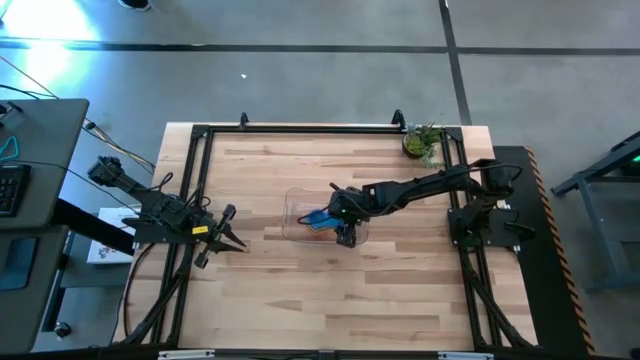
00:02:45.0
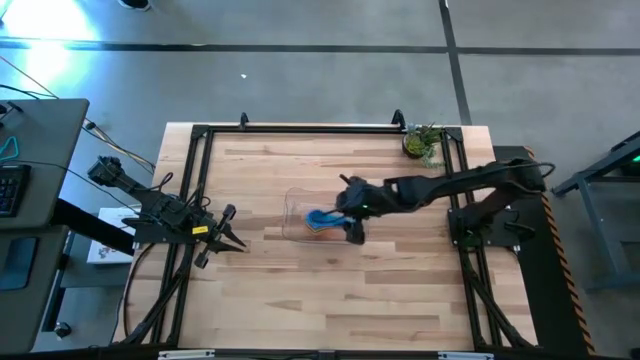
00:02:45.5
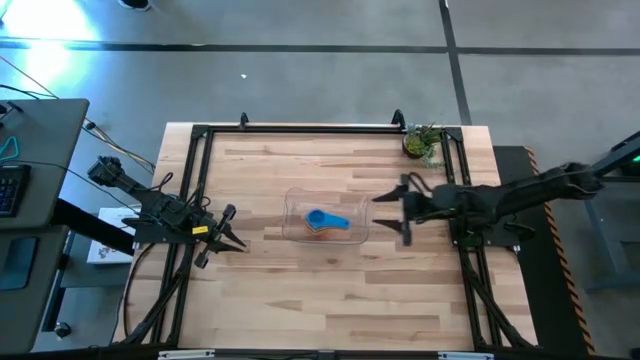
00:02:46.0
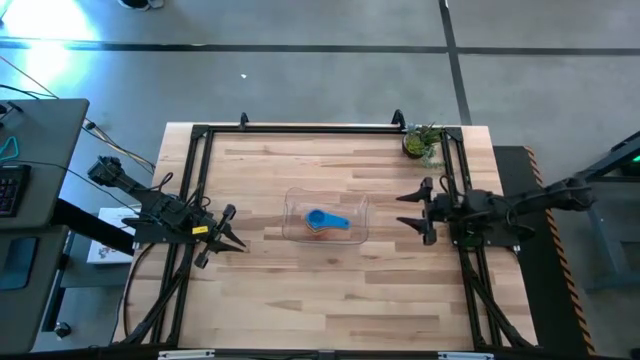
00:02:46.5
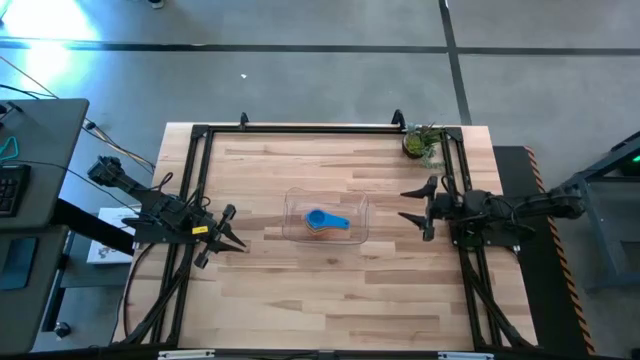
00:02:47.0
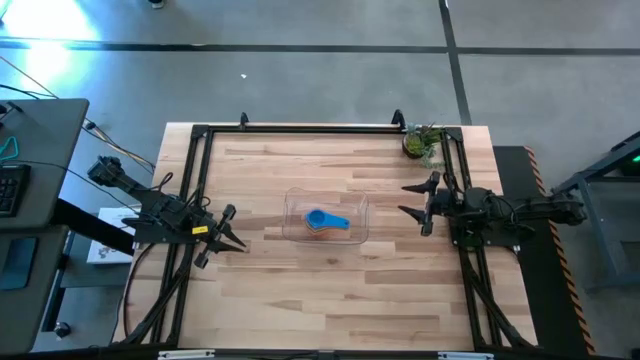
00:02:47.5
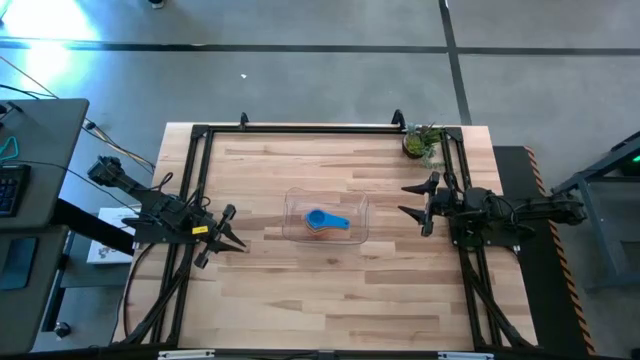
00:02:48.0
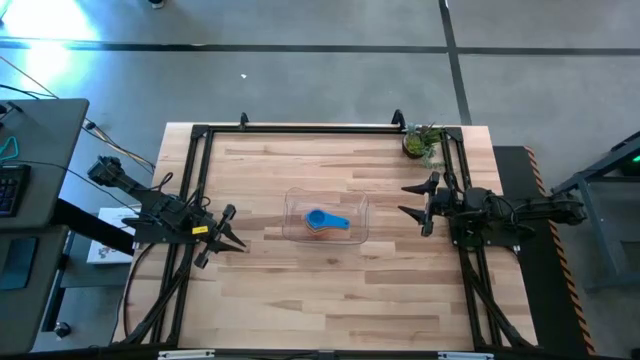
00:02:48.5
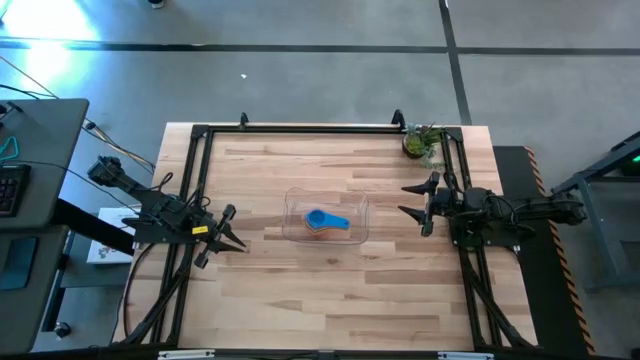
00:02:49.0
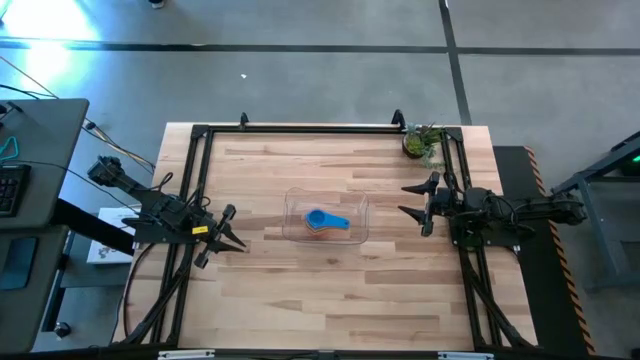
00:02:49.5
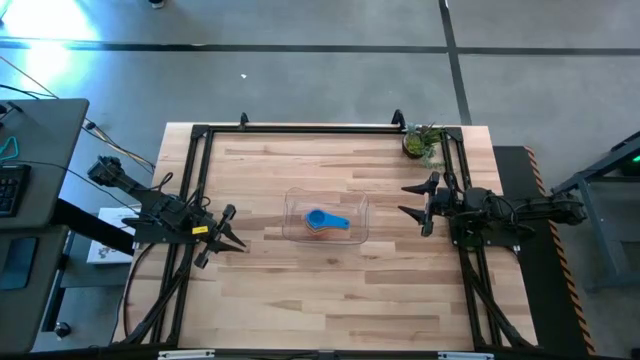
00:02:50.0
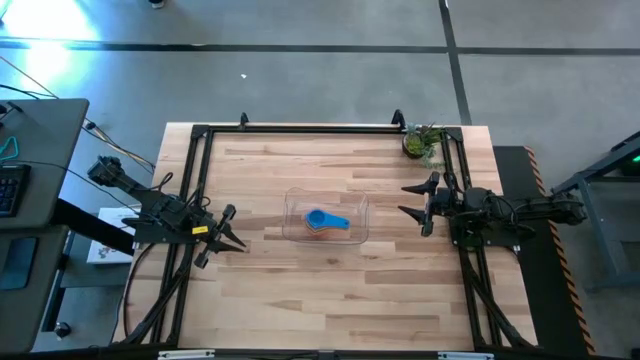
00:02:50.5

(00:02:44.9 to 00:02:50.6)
Task: Nest measuring cups in basket
Return to Home Position

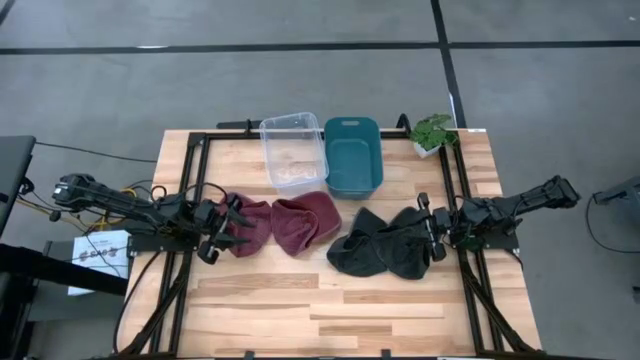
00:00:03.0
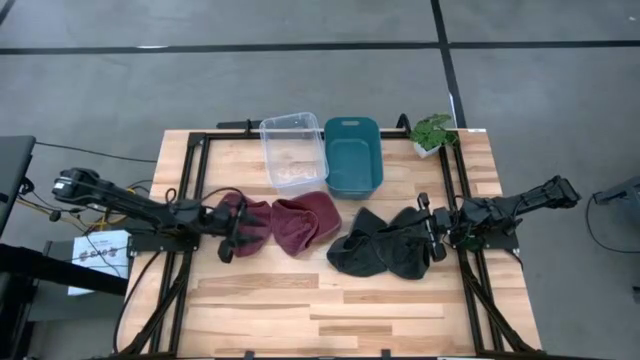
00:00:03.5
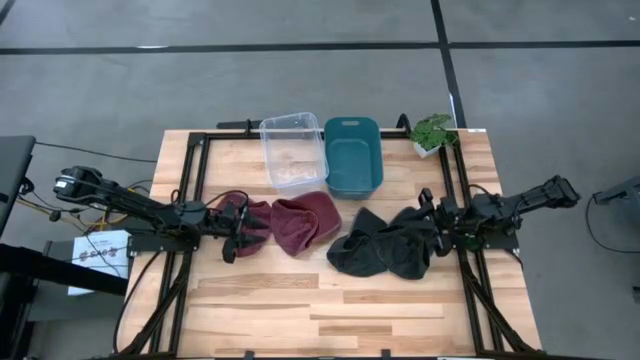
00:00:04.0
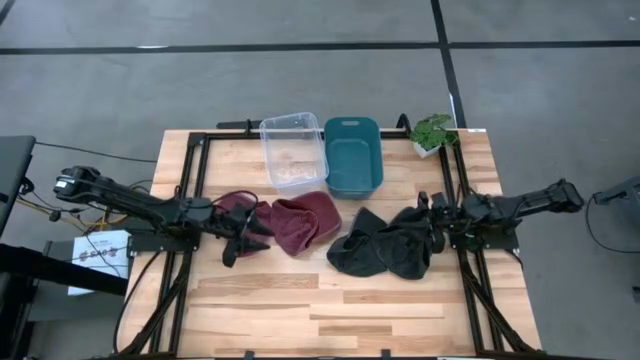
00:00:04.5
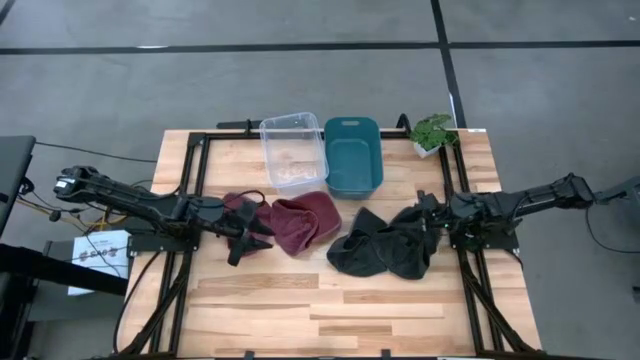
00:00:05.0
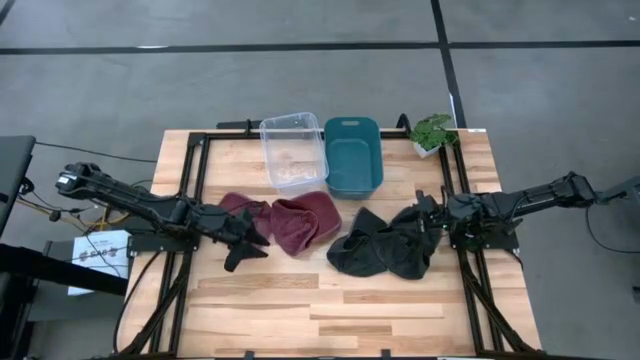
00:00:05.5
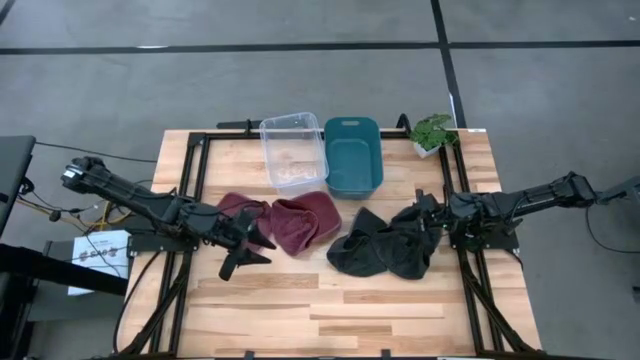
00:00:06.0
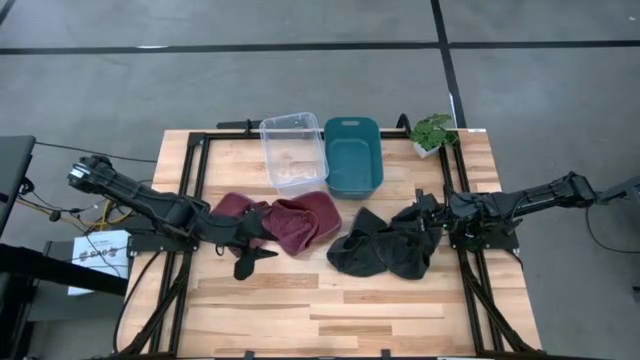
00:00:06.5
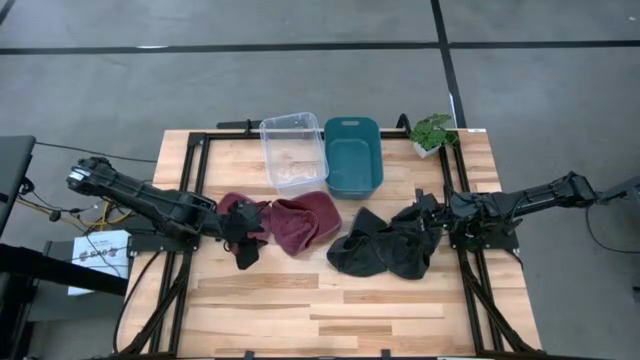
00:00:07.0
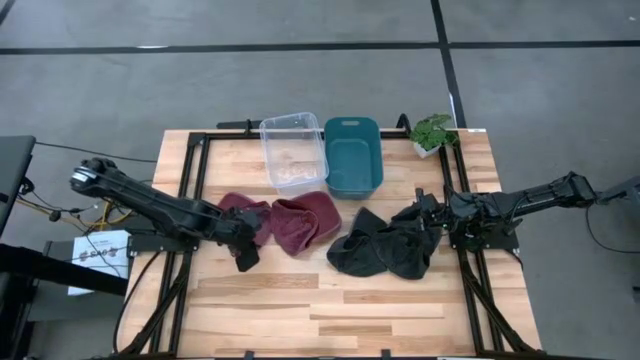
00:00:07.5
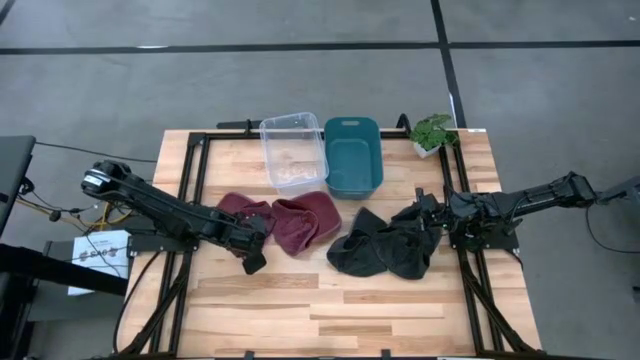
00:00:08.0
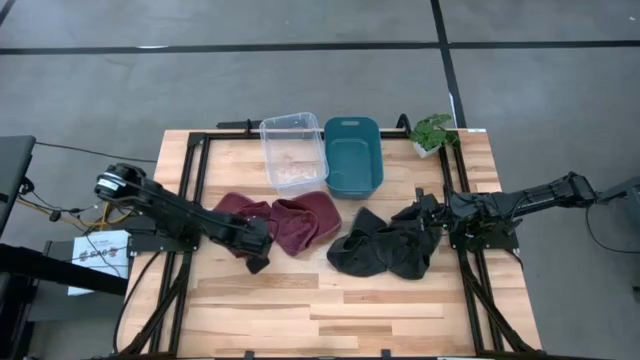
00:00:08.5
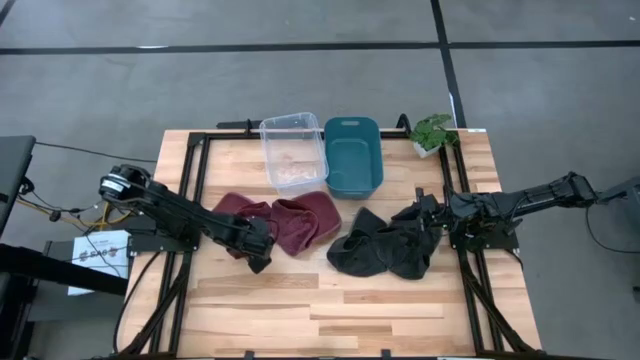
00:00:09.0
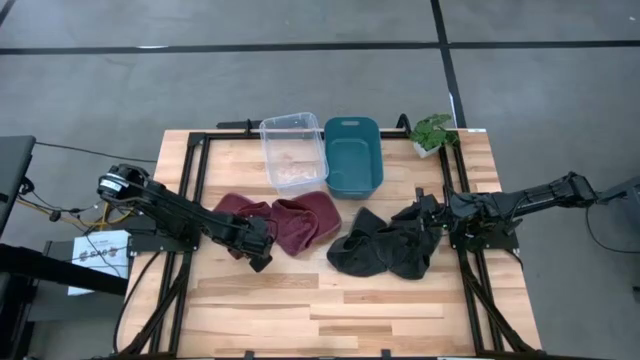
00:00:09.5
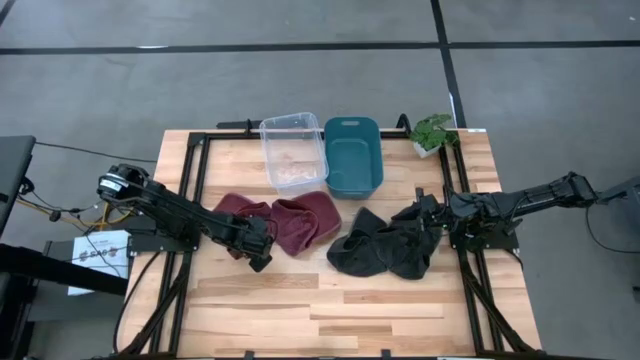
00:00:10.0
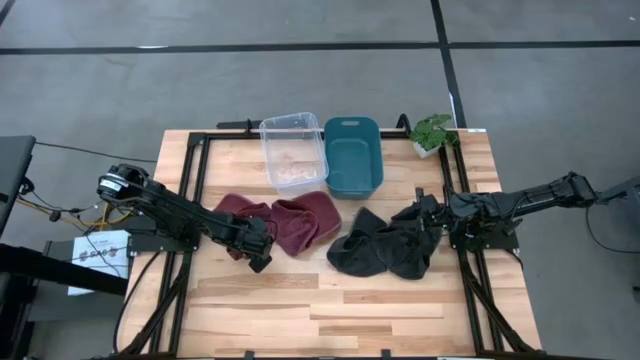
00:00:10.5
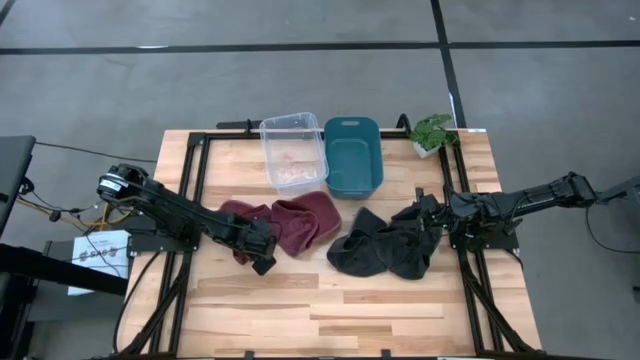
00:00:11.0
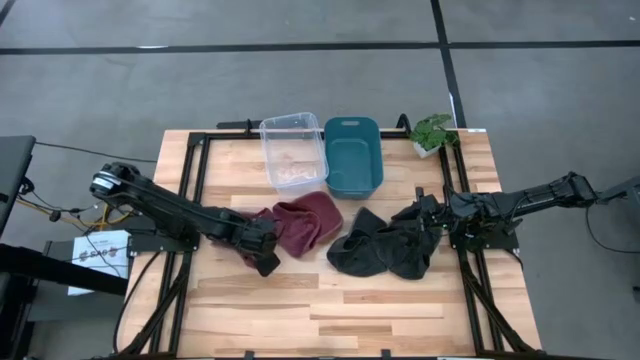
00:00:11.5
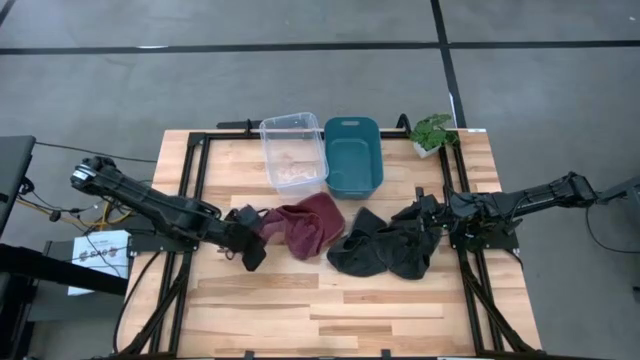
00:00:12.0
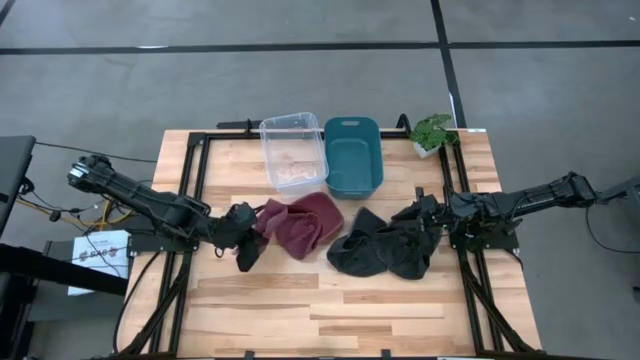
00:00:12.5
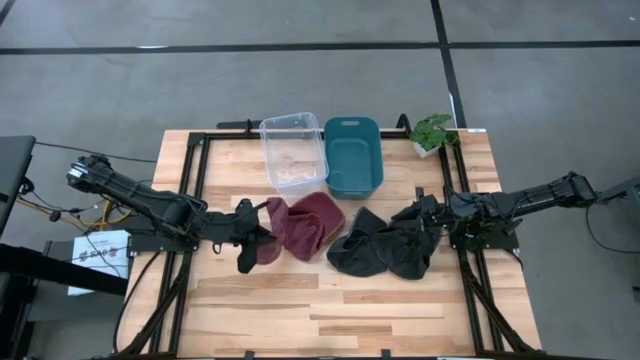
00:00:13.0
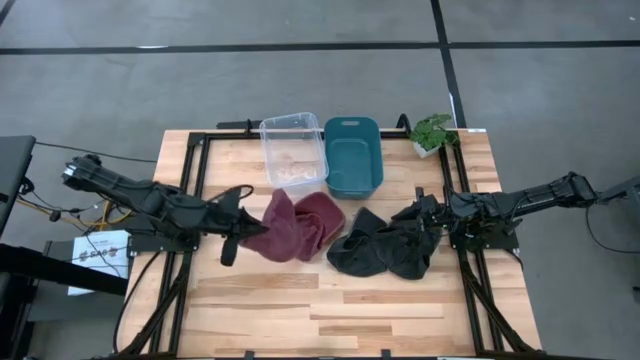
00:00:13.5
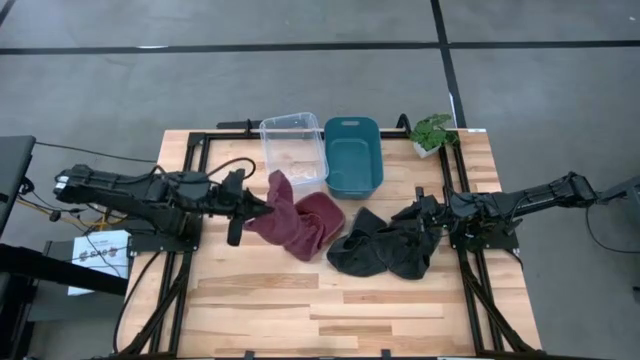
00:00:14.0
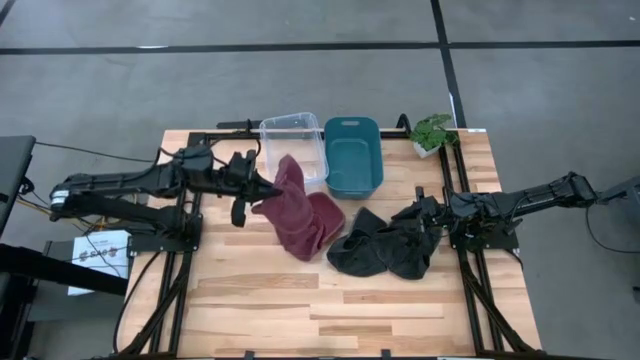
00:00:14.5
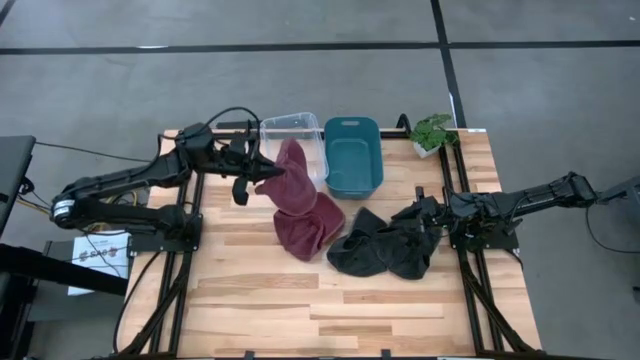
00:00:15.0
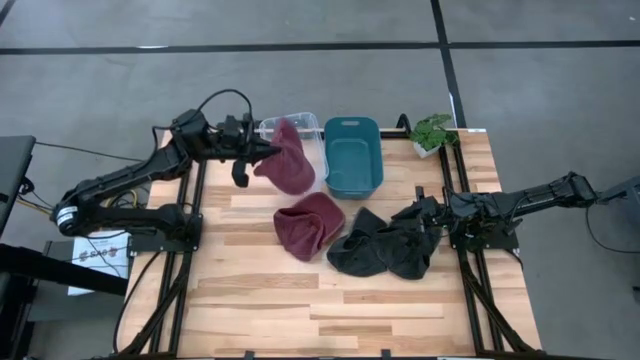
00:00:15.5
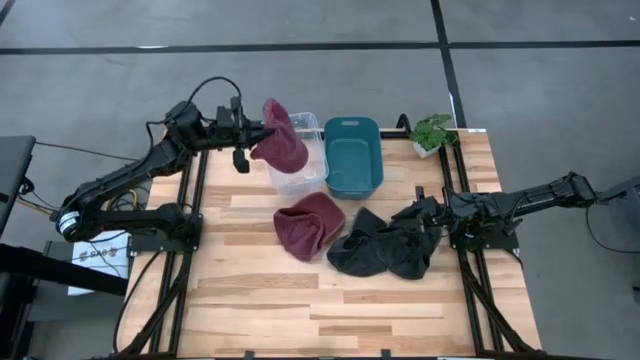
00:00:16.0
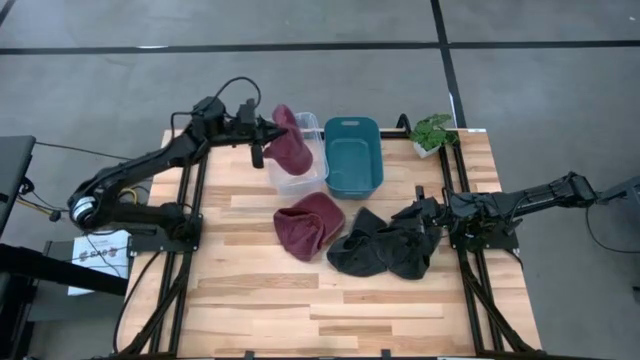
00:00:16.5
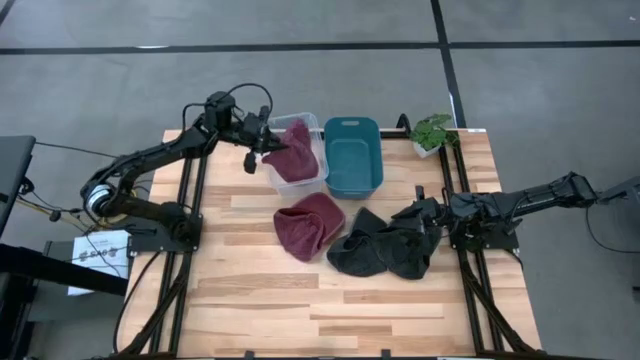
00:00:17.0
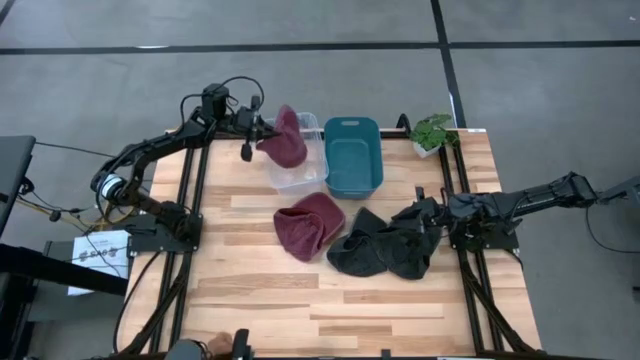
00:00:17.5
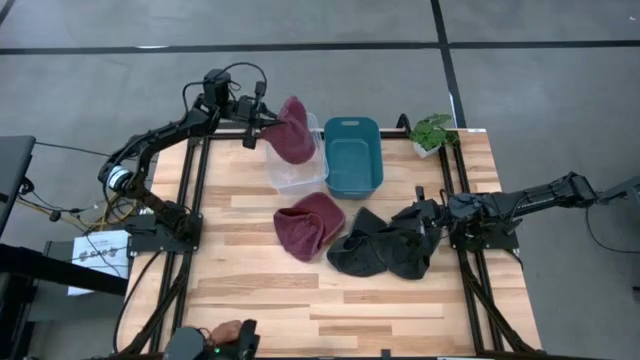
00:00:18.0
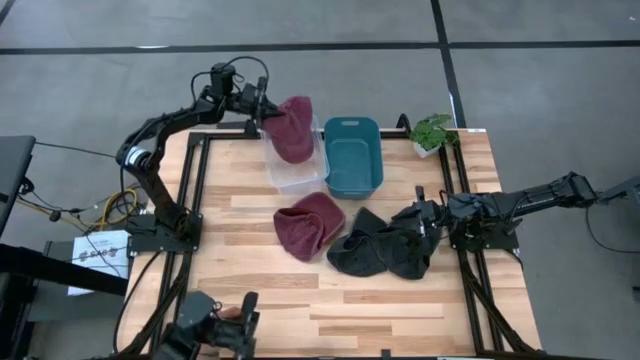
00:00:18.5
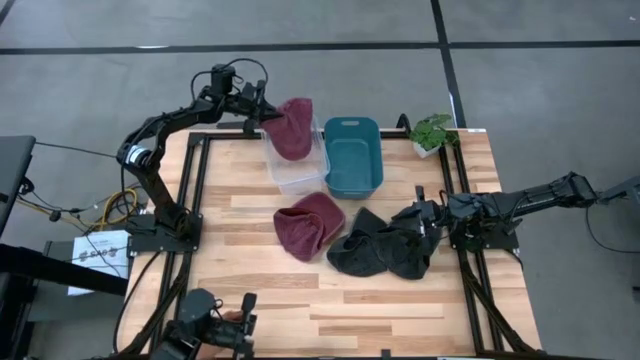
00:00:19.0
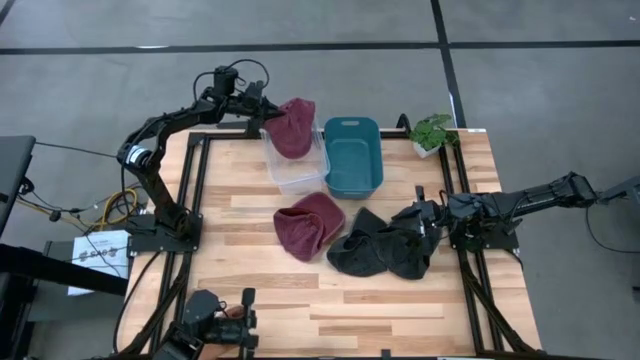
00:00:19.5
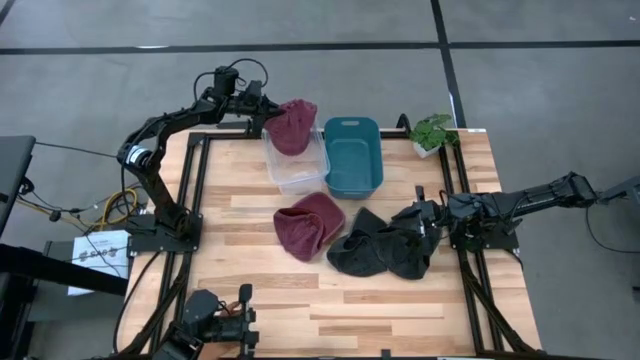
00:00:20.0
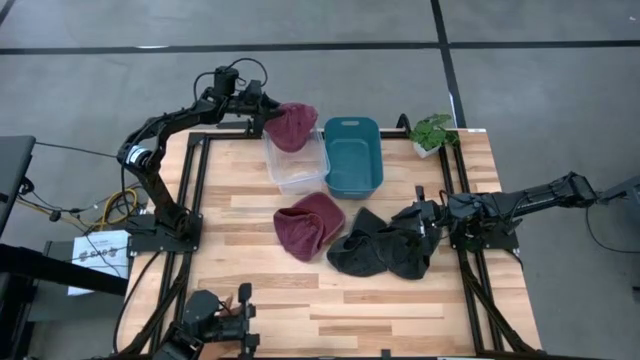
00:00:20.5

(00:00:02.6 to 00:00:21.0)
Task: Pick & Place hat
Put the left red cap into the transparent bin
